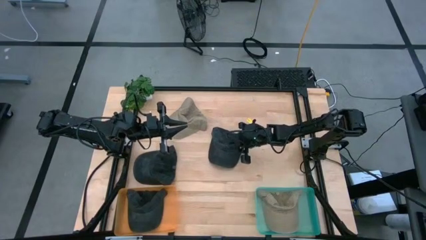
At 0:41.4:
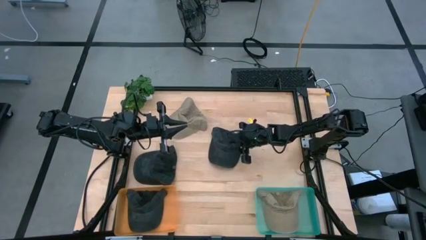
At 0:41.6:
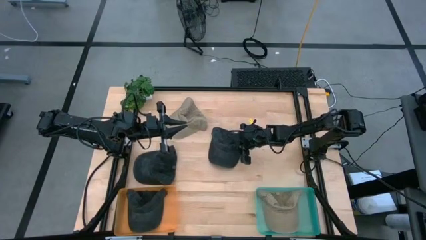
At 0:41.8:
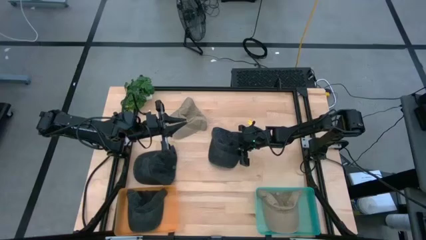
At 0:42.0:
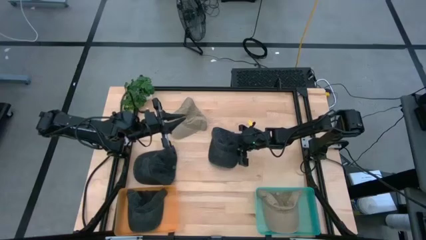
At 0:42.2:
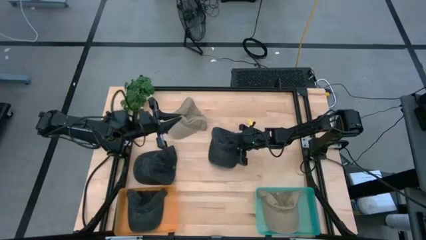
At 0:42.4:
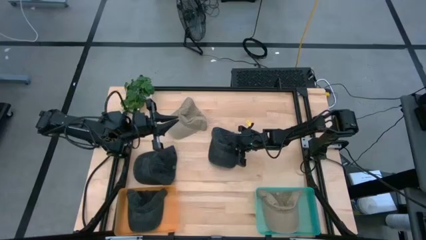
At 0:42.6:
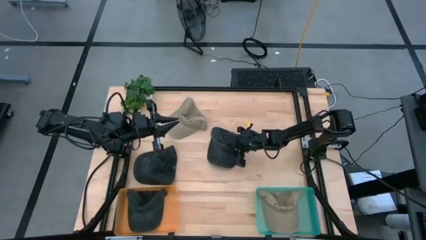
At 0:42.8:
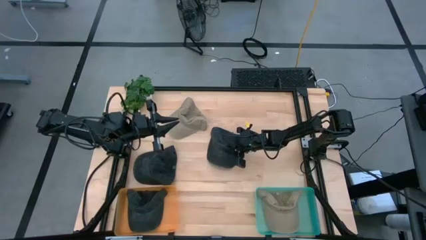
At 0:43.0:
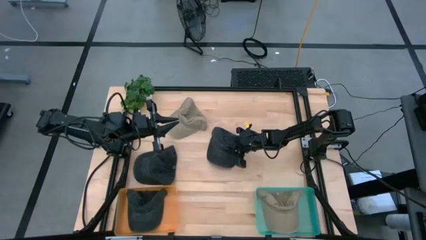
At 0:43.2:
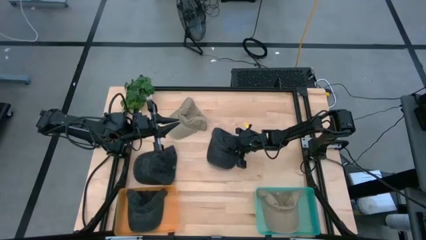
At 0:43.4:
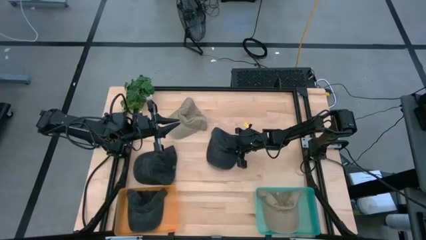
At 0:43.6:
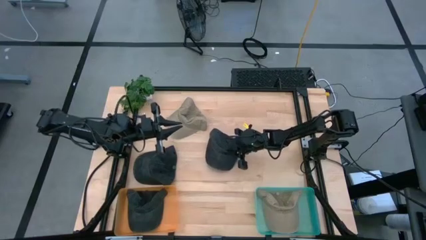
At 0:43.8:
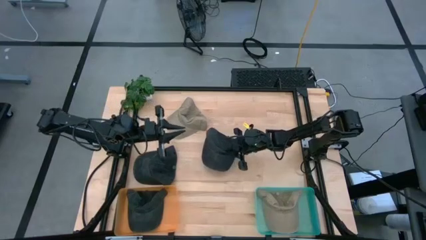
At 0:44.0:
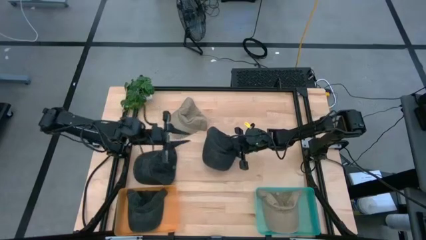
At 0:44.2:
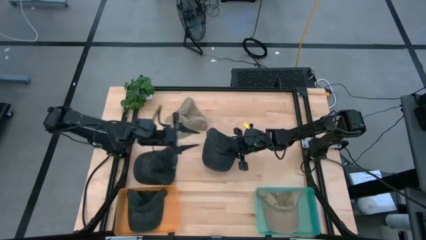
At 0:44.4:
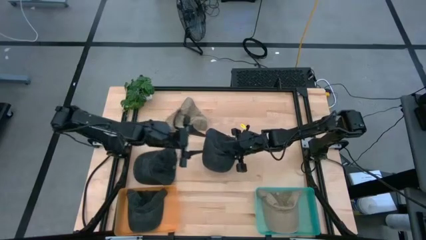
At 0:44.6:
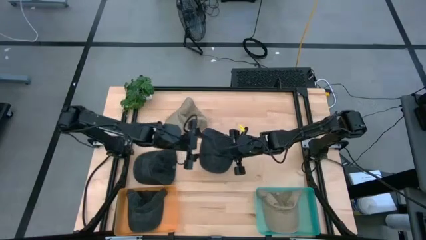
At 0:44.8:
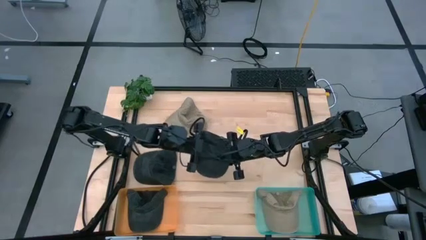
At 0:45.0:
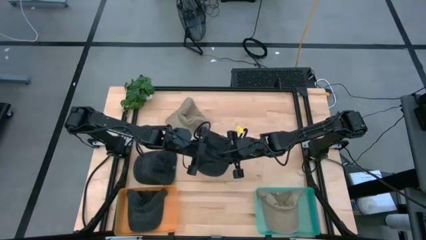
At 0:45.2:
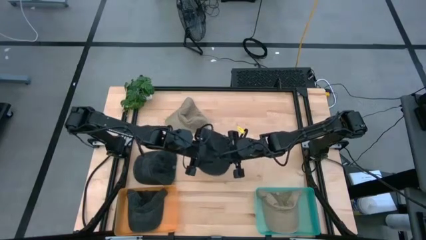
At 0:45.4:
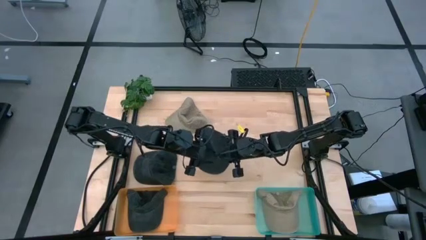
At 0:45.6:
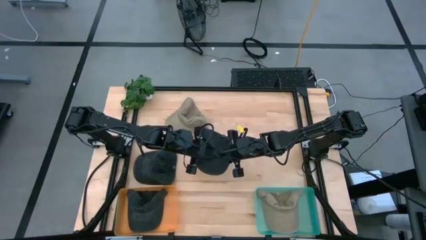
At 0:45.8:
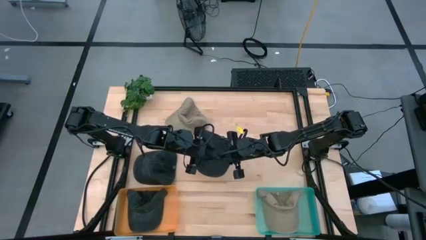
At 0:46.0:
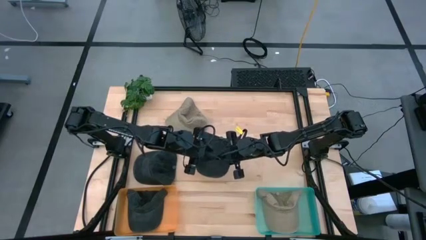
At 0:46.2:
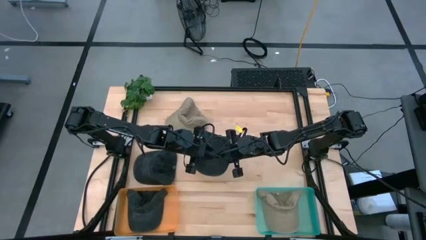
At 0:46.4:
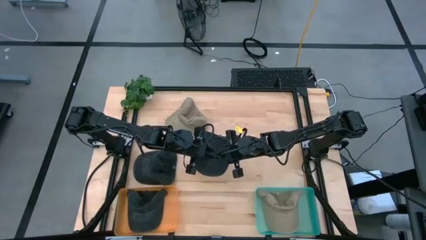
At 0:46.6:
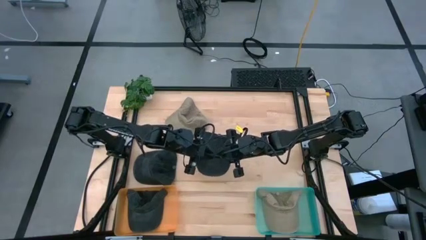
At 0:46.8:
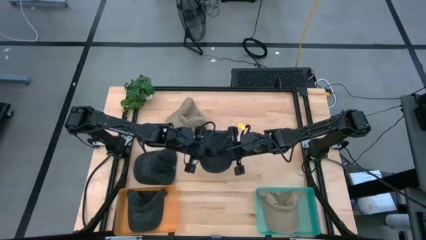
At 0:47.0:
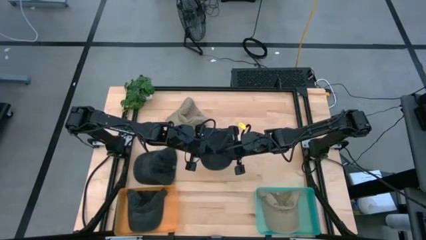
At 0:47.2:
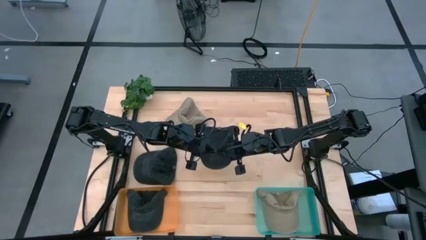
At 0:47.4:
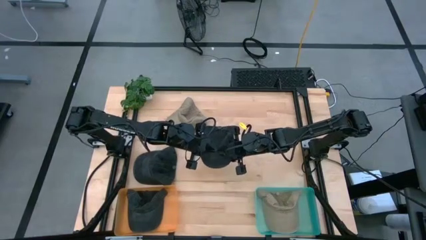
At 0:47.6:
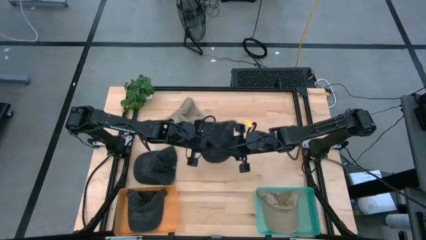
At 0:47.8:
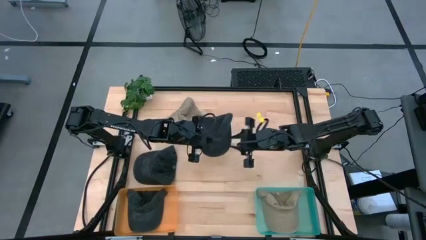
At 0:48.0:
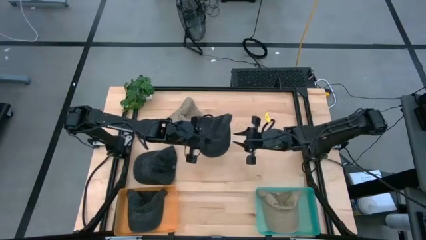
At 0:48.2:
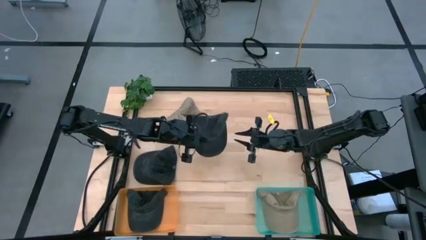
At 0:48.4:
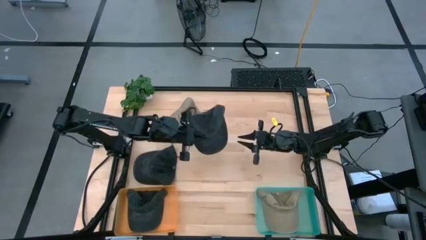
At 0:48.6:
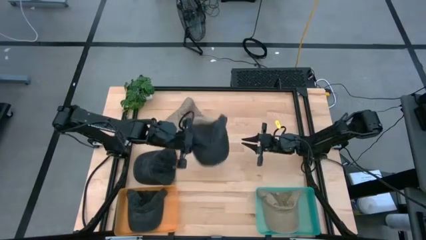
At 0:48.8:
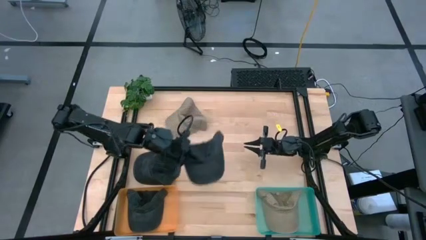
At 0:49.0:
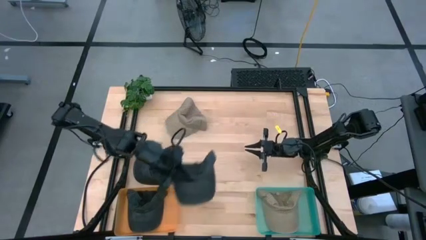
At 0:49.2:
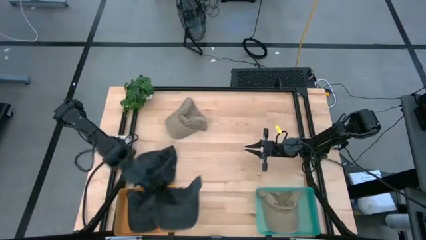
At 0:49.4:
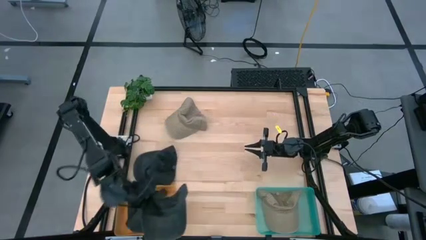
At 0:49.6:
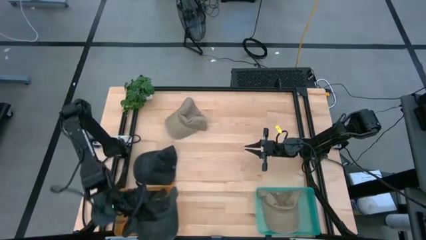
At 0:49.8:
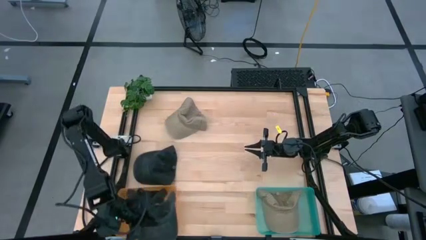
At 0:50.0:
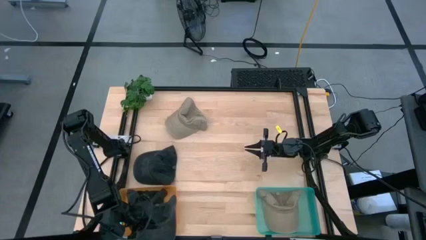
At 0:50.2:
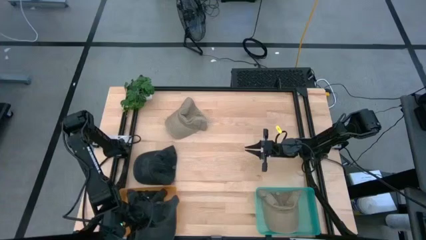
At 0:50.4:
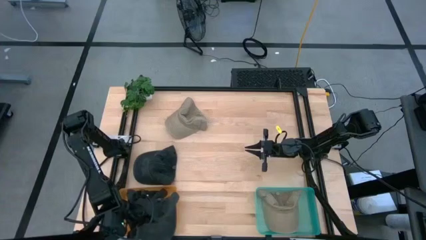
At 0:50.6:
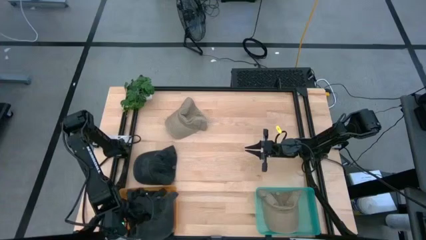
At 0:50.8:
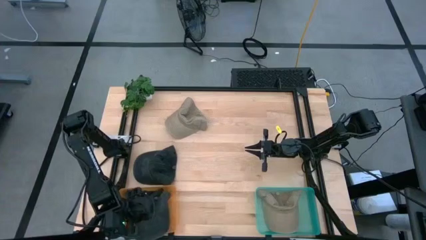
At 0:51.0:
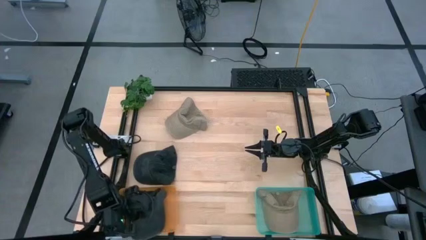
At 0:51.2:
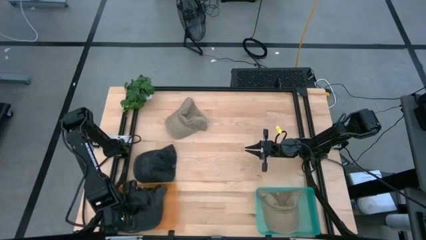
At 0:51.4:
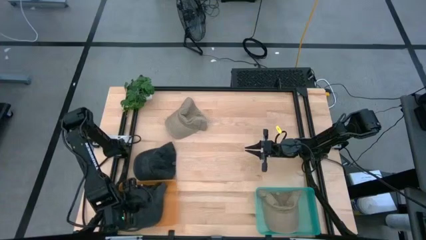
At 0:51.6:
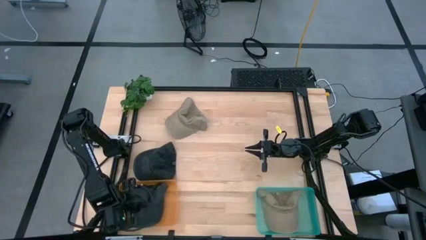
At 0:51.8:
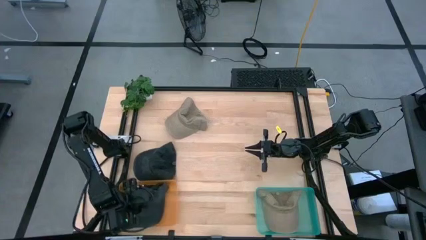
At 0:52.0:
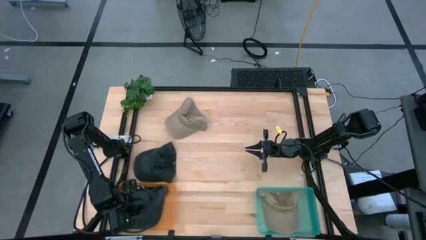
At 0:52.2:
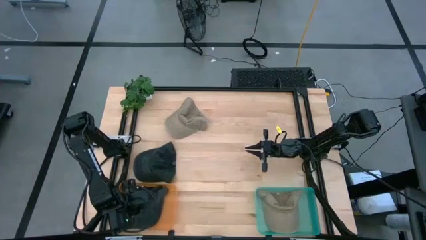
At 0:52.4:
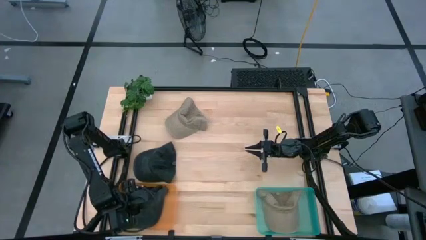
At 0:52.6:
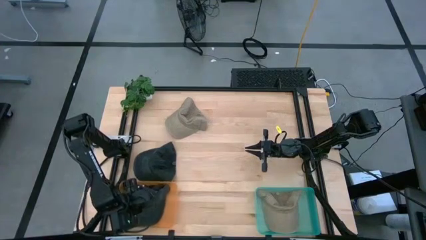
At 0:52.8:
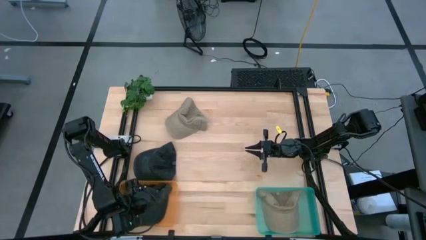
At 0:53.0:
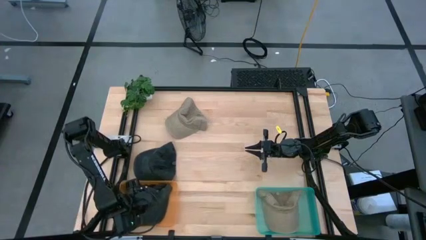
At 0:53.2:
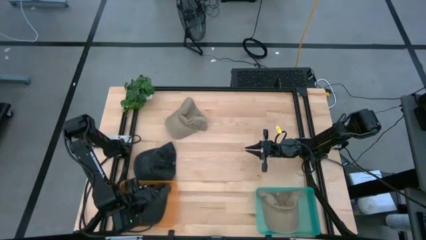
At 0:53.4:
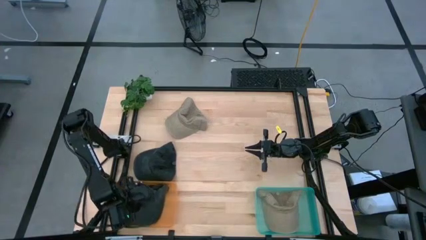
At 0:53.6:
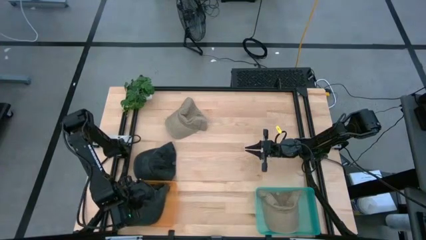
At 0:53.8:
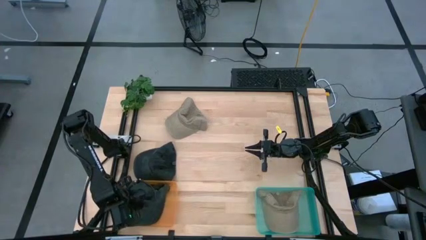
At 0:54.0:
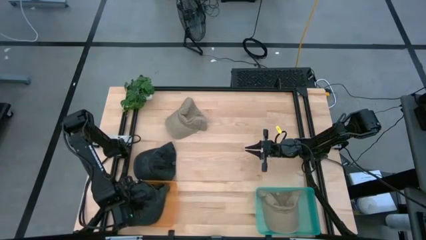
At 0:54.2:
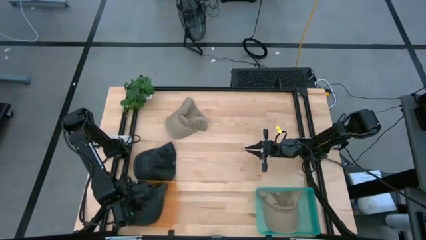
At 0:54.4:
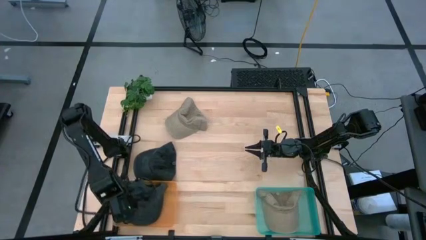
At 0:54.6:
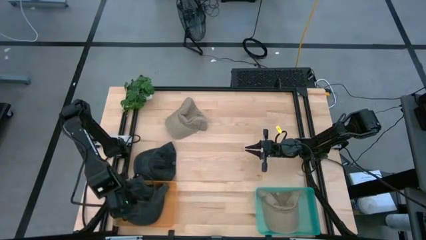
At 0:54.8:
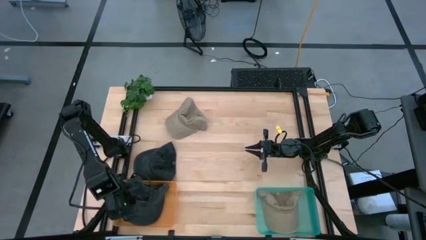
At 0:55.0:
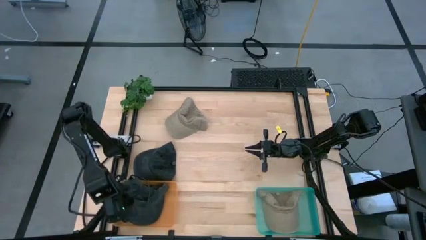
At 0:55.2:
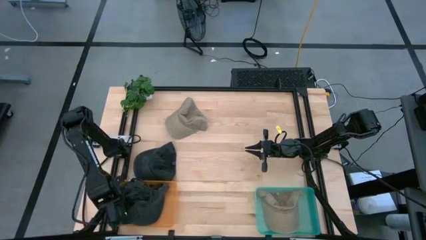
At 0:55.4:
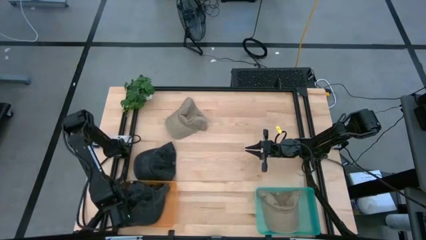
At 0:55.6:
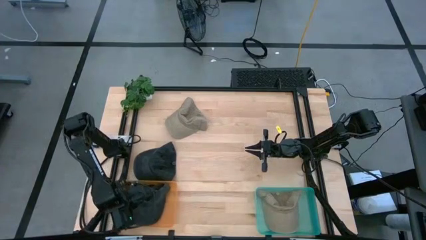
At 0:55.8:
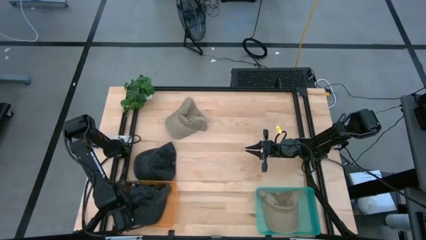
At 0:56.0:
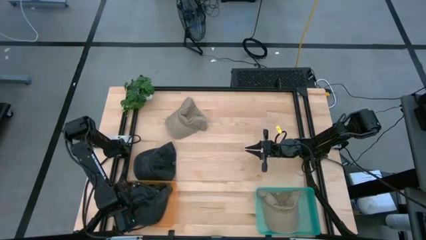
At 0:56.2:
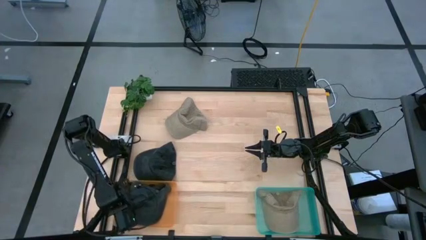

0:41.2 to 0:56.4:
Task: Pick & Place hat
Put the top black cap into the orange bin

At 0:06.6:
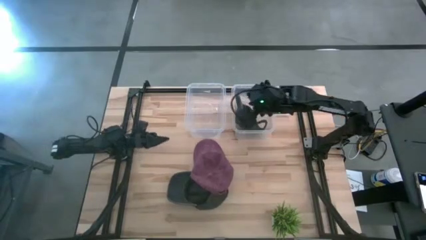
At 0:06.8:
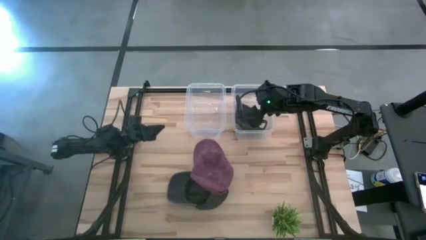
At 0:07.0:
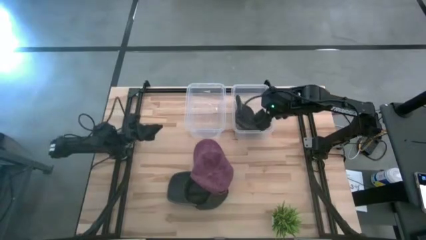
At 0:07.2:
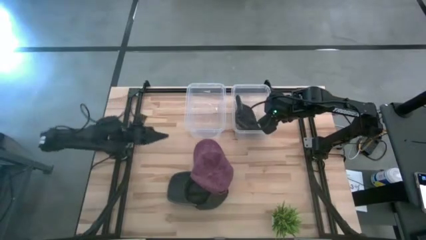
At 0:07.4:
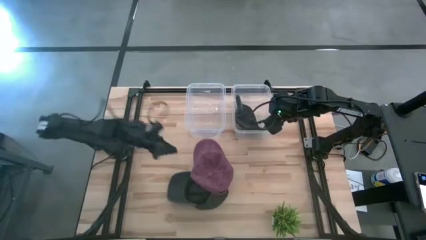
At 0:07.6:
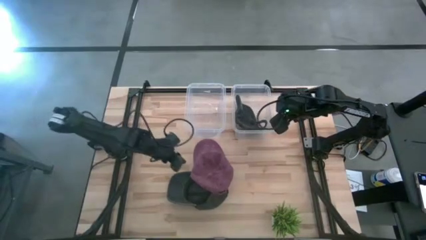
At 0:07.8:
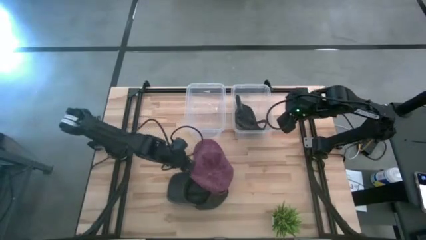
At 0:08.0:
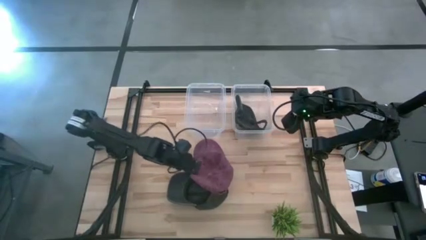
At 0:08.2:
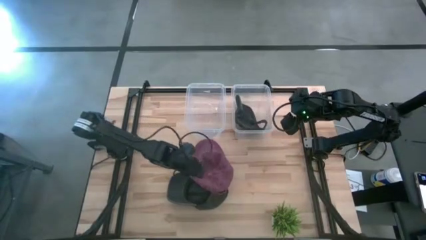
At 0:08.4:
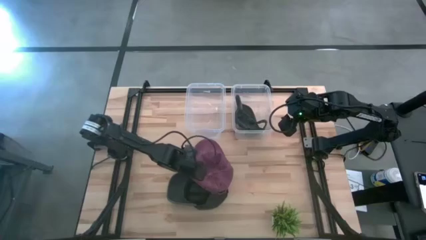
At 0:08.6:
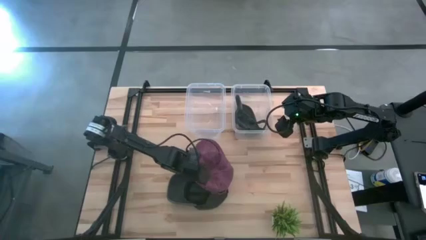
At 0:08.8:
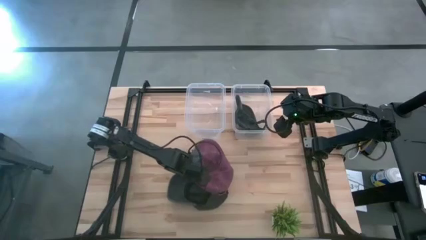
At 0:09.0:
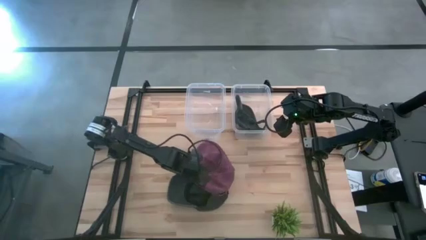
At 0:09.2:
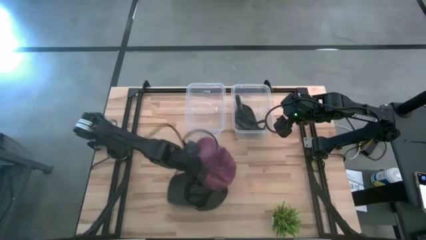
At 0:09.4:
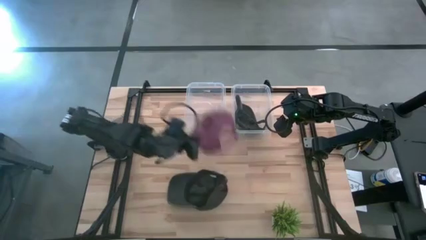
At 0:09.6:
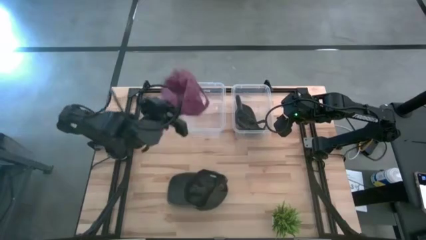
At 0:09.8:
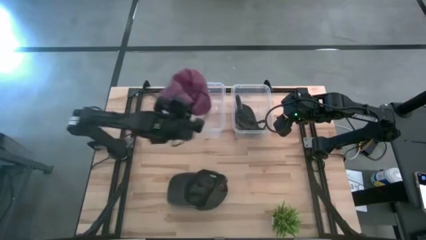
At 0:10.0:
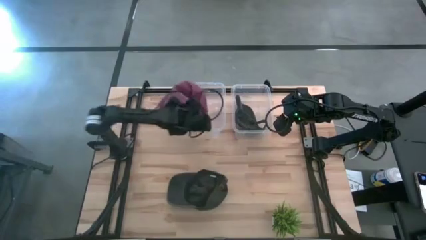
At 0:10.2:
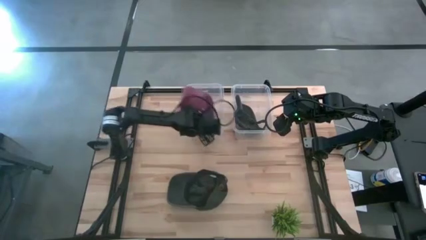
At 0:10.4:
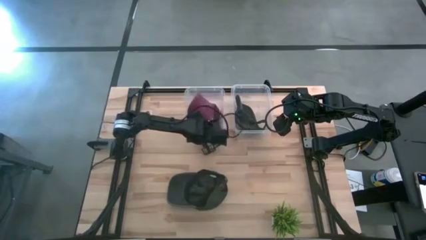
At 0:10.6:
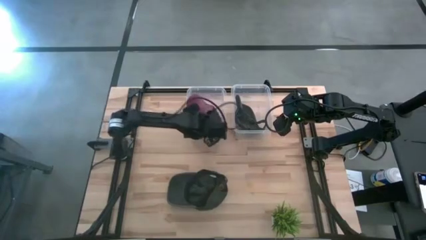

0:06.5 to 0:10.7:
Task: Pick & Place hat
Put the dark red cap into the left transparent bin
